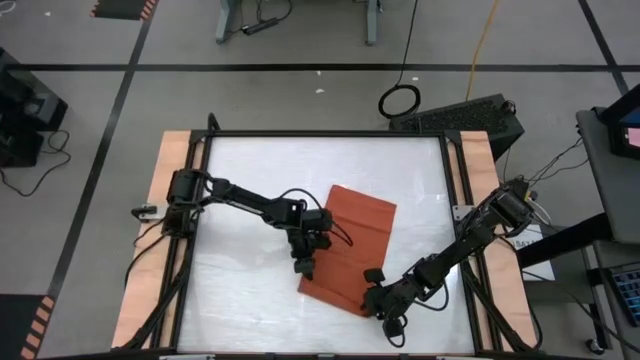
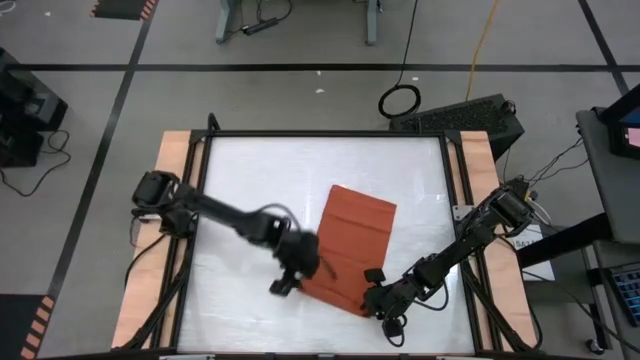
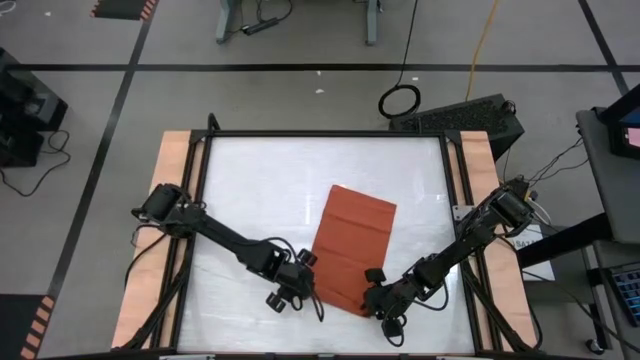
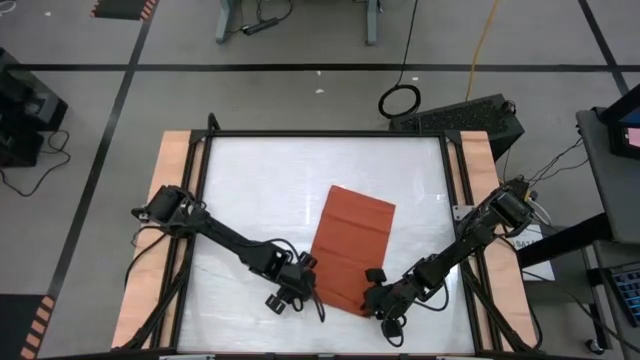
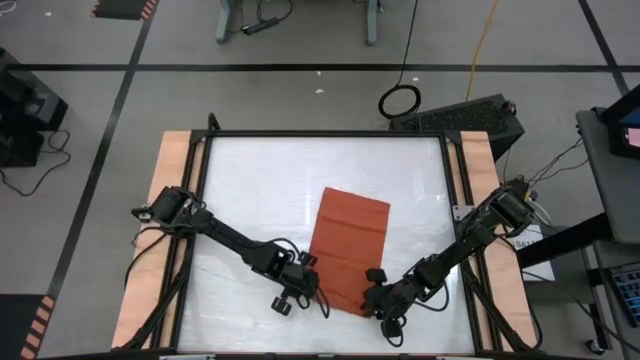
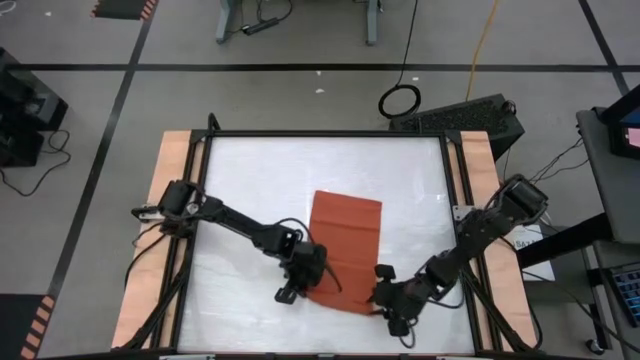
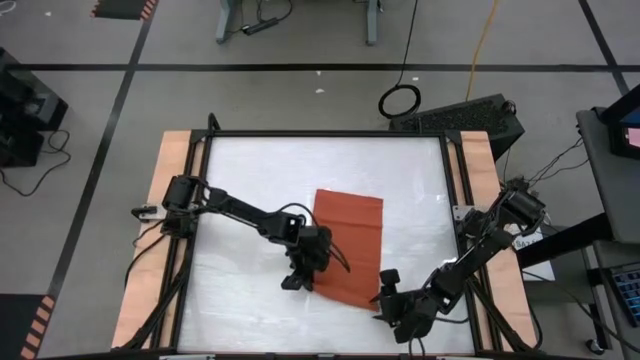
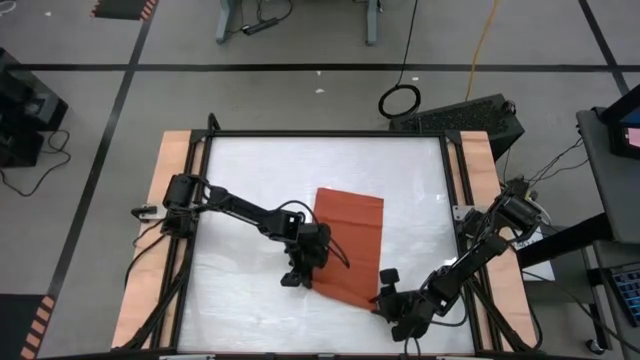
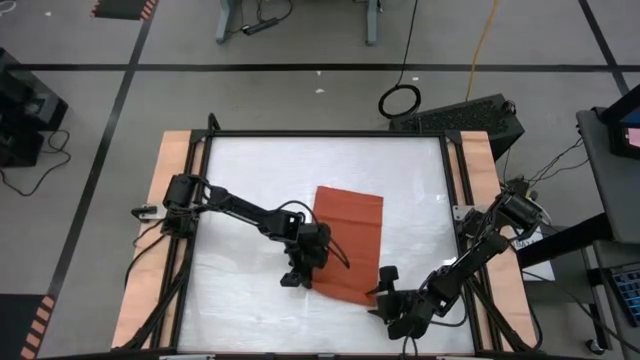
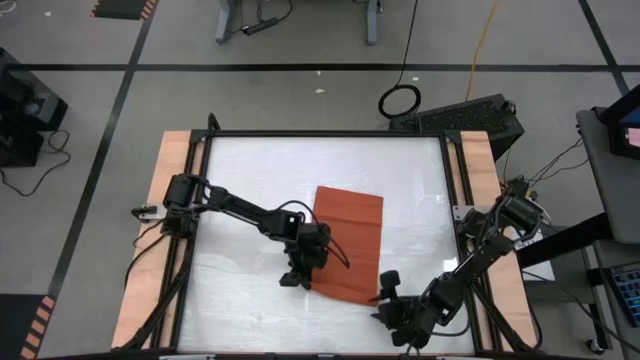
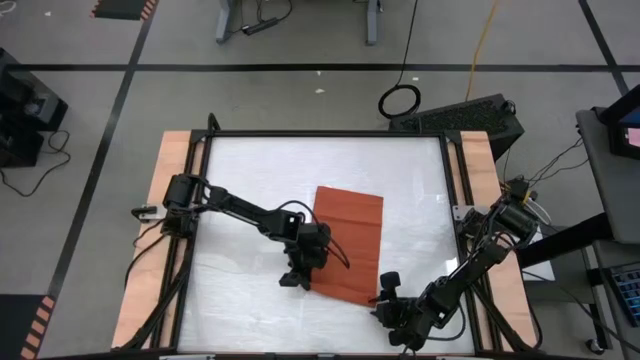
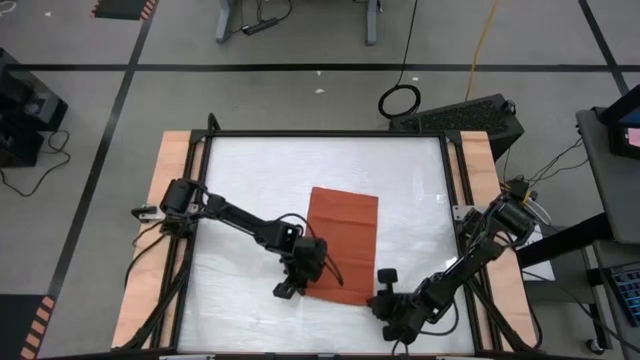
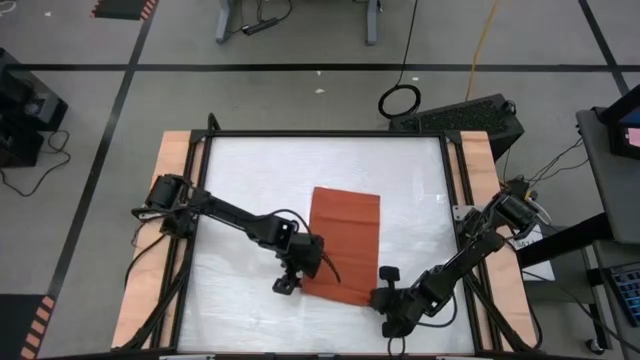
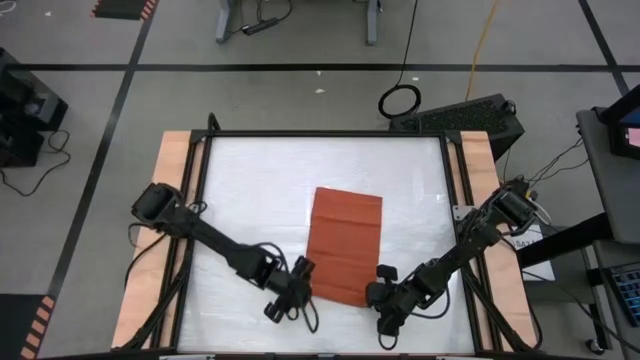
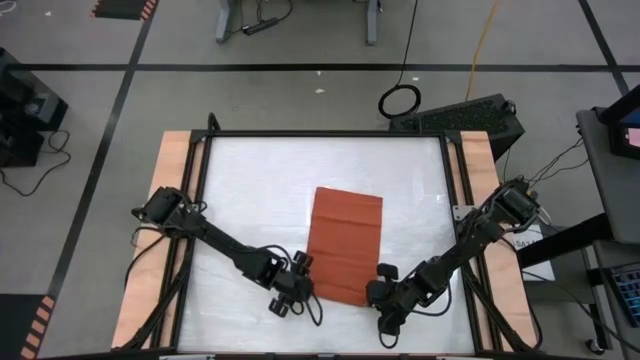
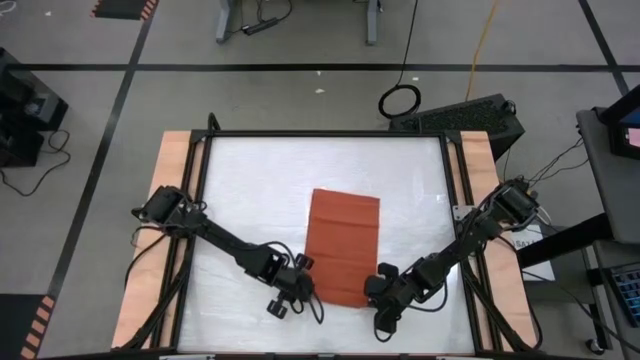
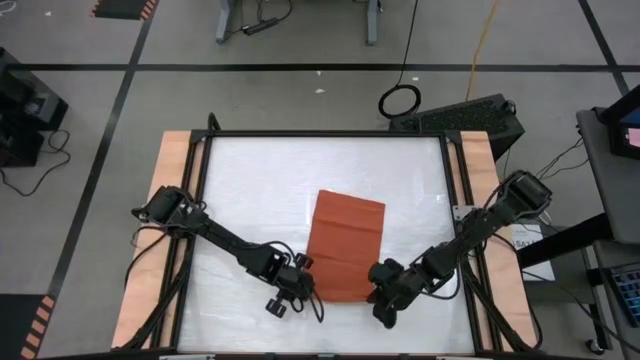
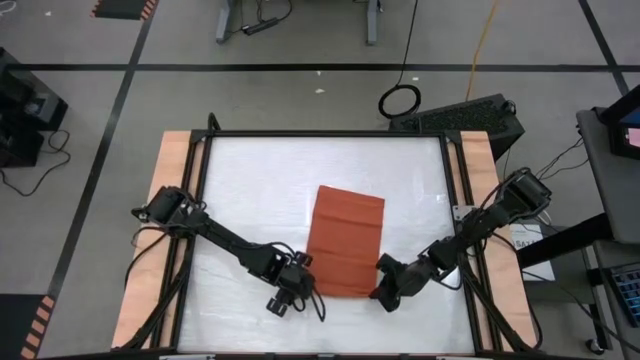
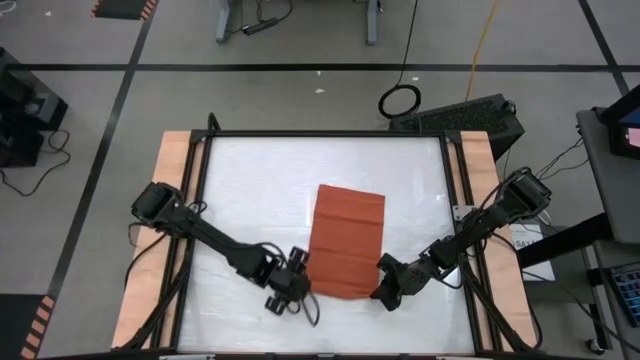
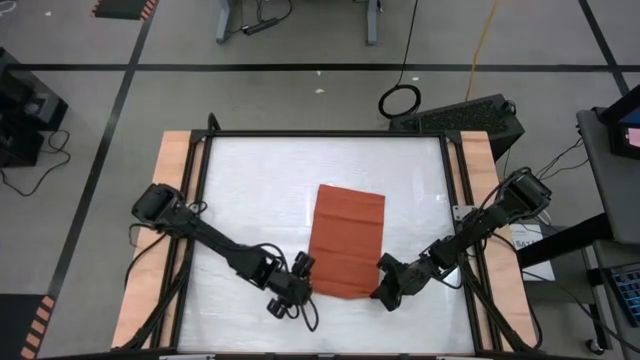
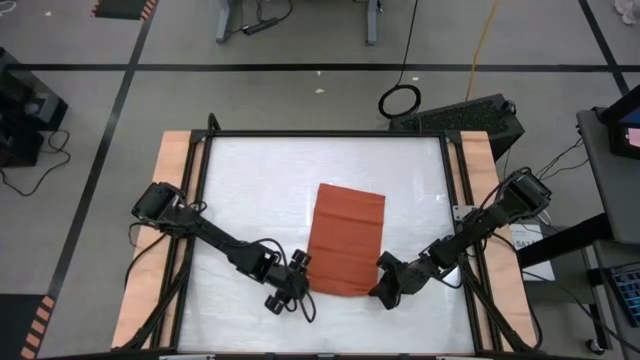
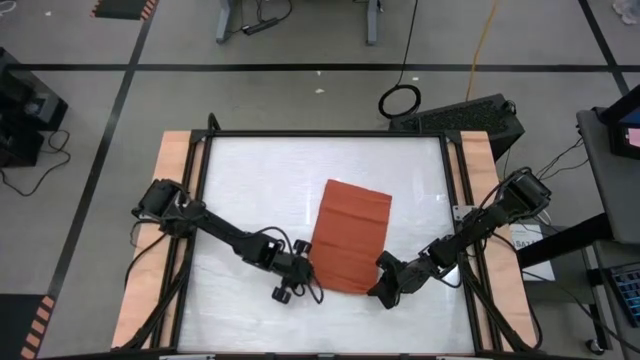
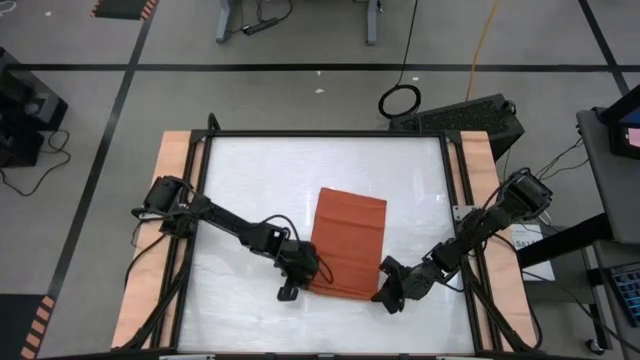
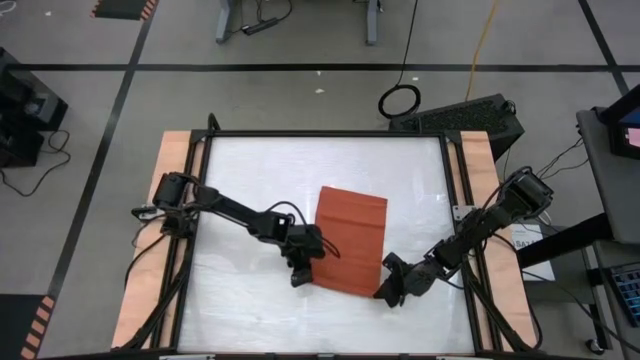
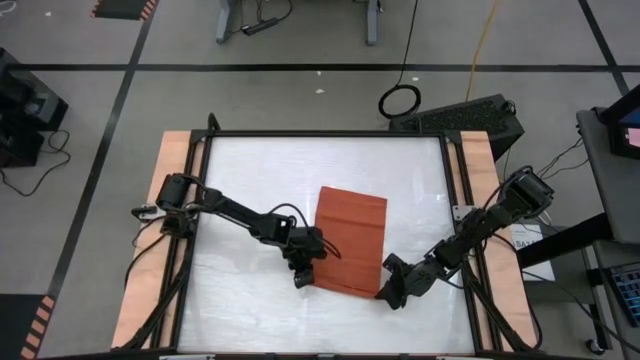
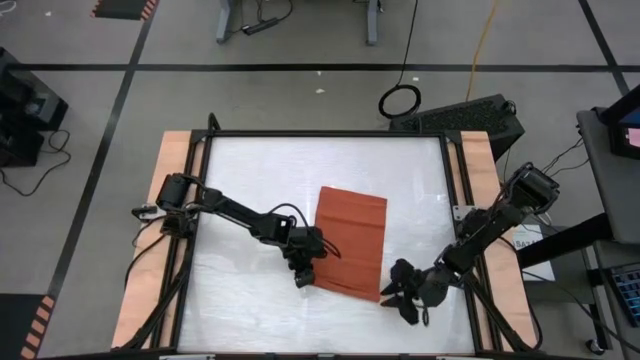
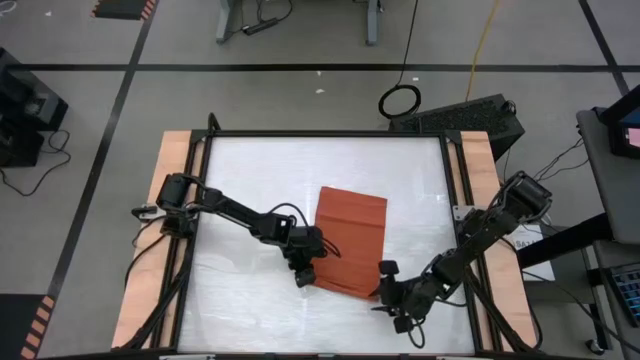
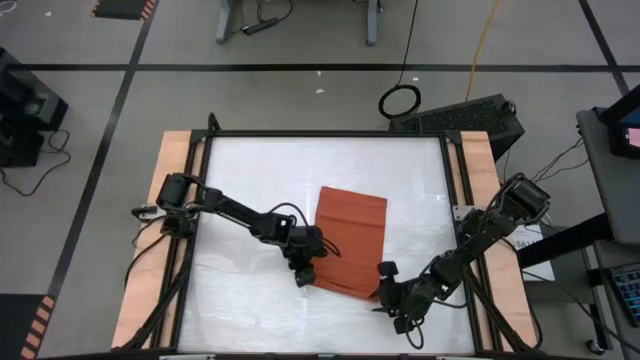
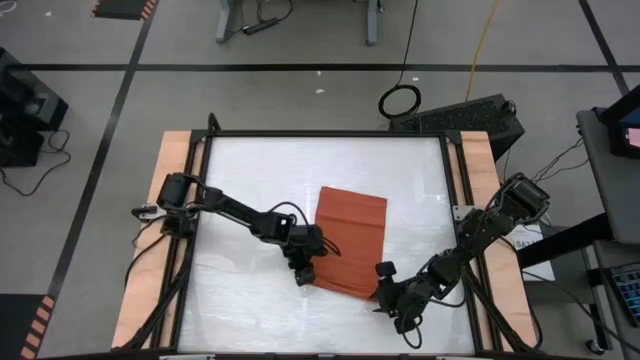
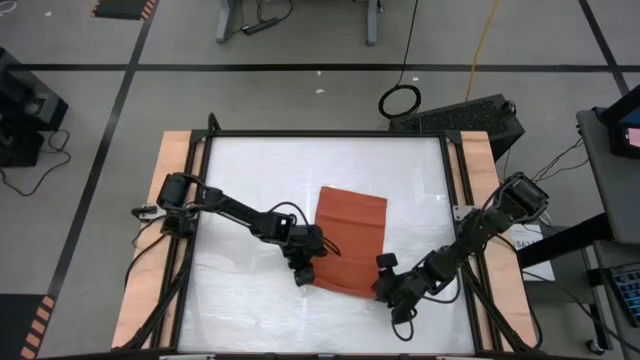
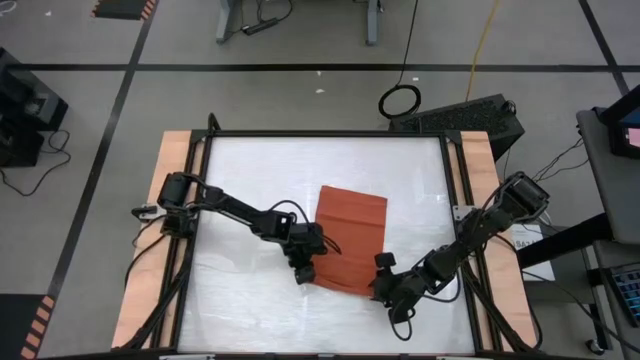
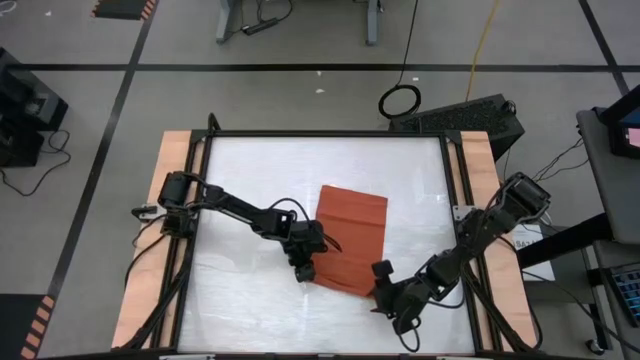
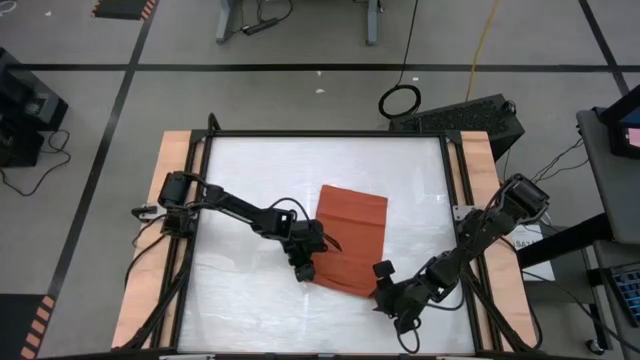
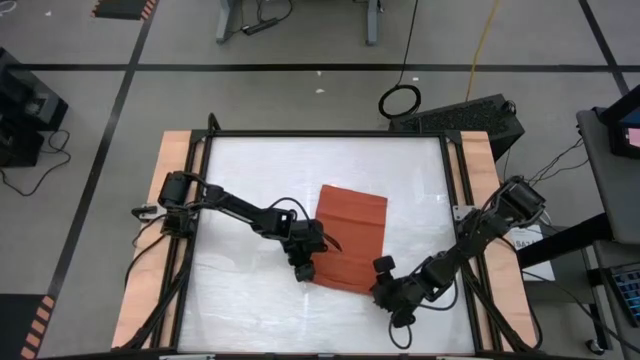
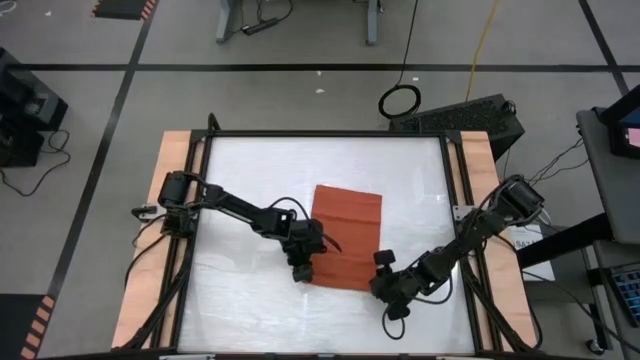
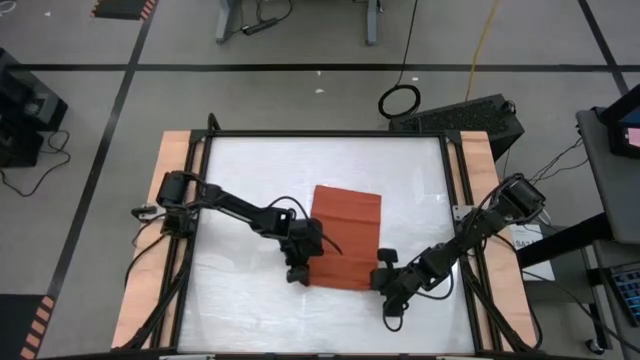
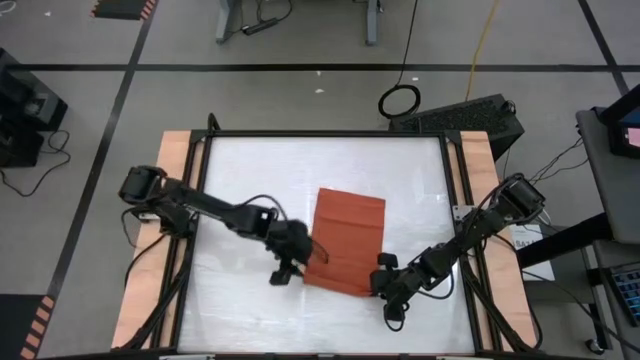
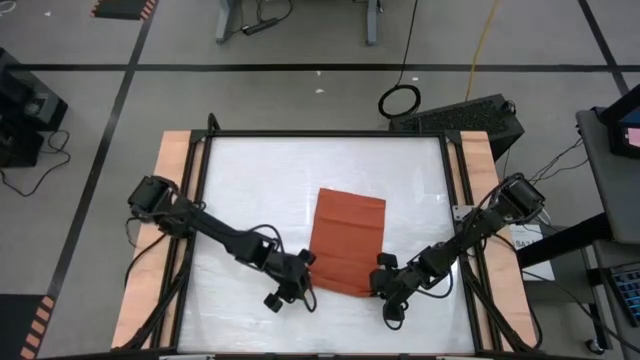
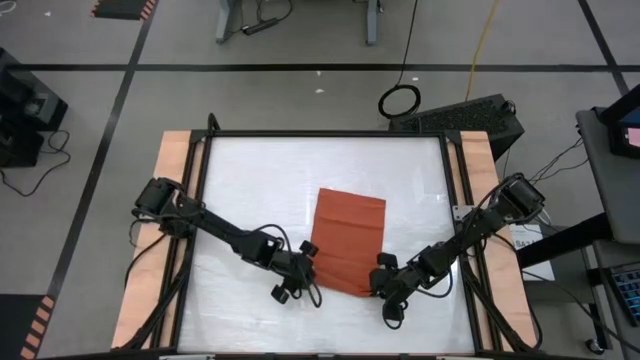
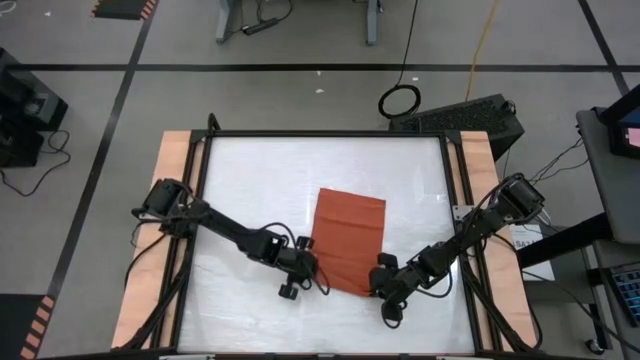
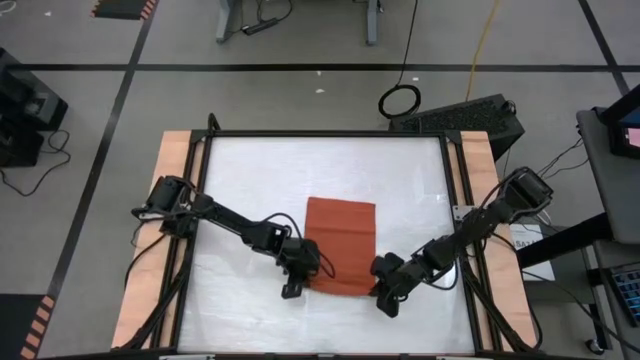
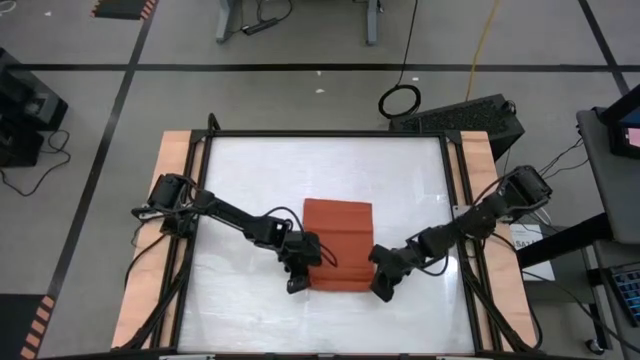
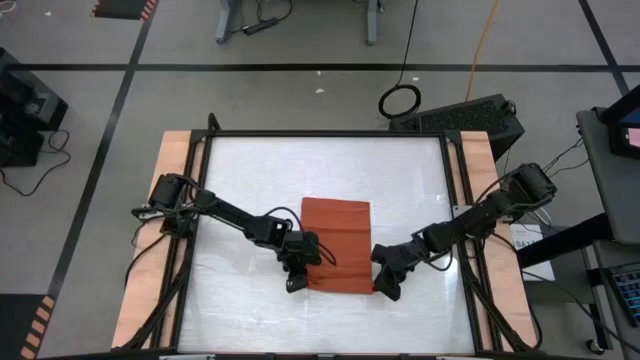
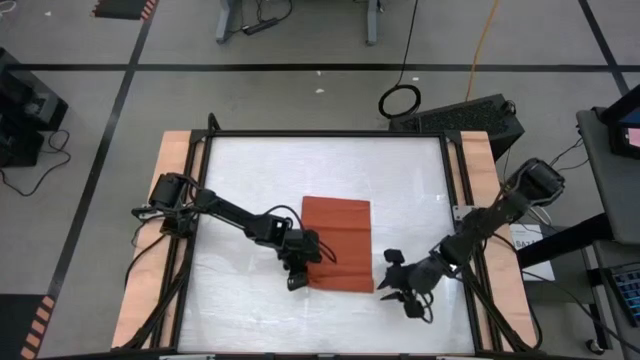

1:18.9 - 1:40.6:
Task: Roll towel into tight, uniform cylinder
Roll the kitchen towel
